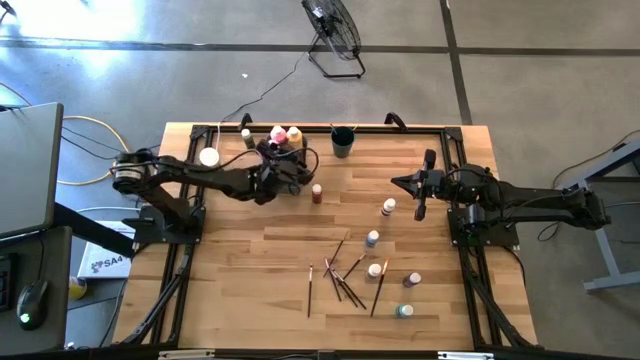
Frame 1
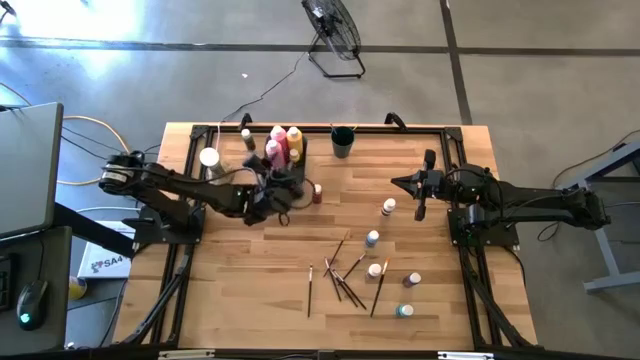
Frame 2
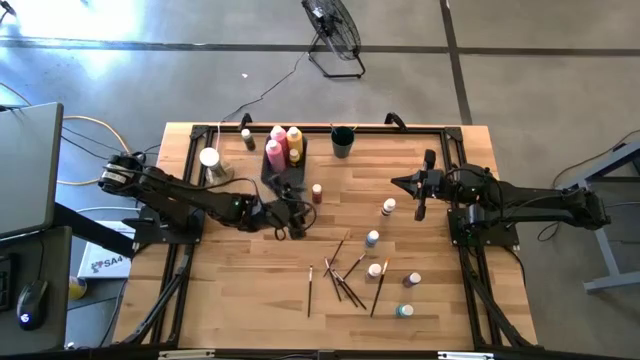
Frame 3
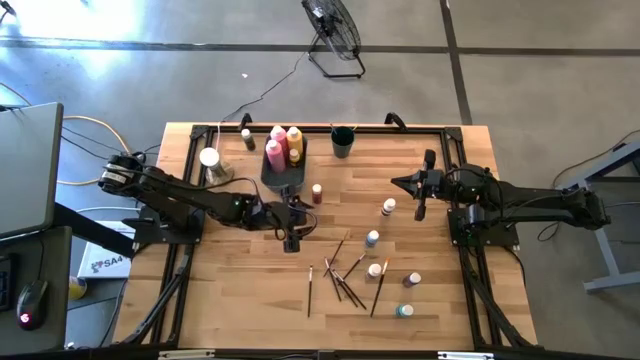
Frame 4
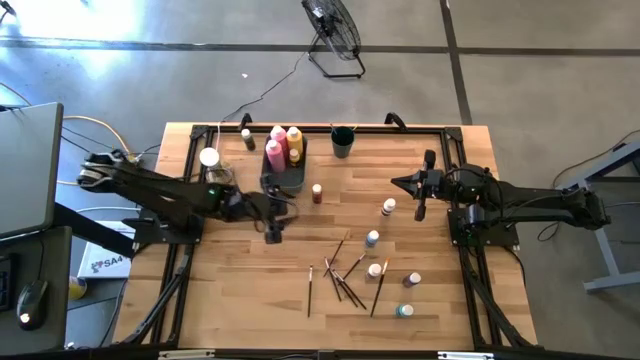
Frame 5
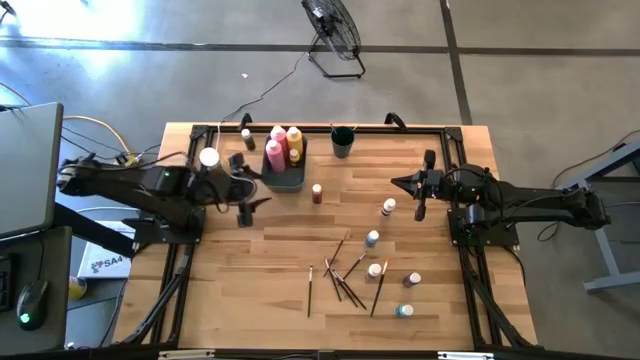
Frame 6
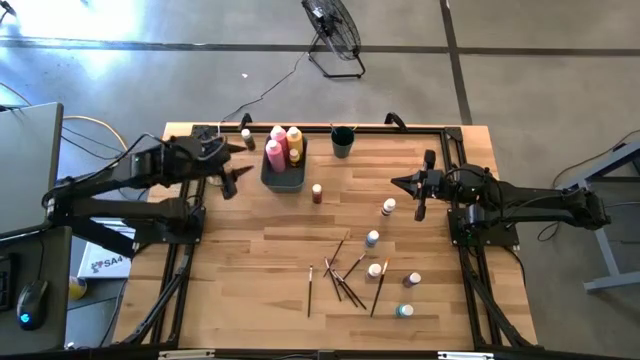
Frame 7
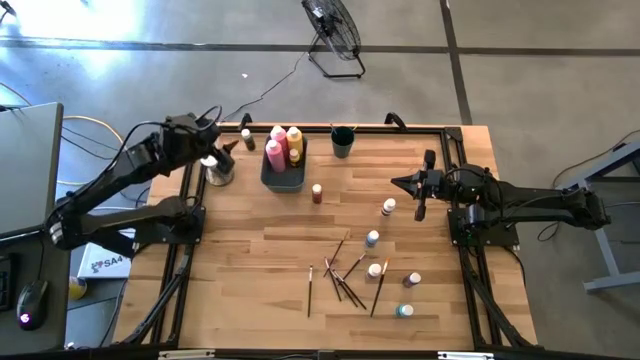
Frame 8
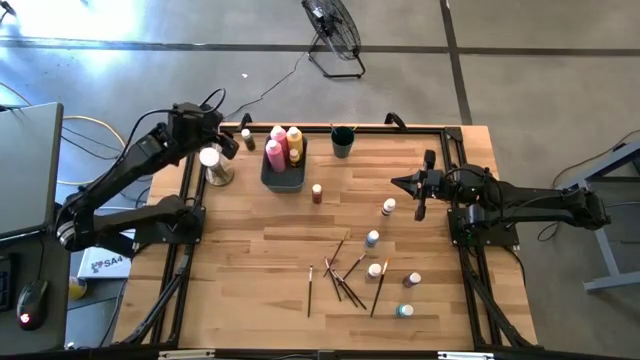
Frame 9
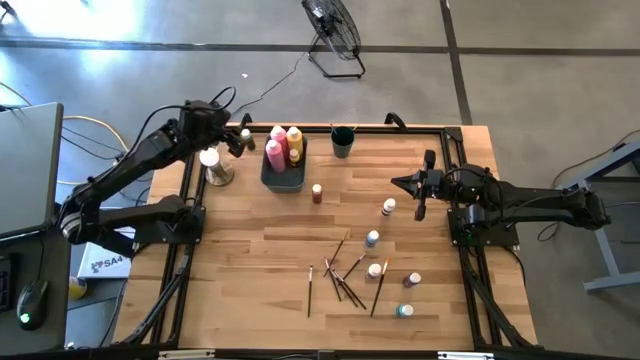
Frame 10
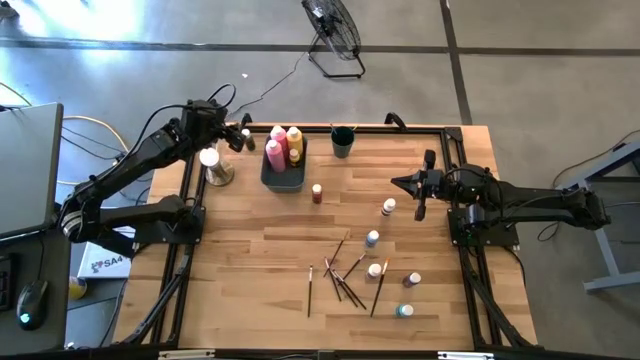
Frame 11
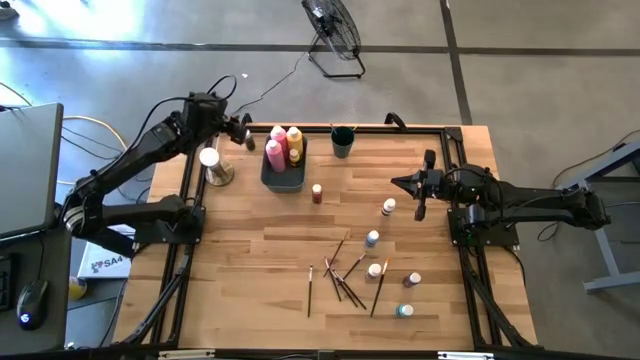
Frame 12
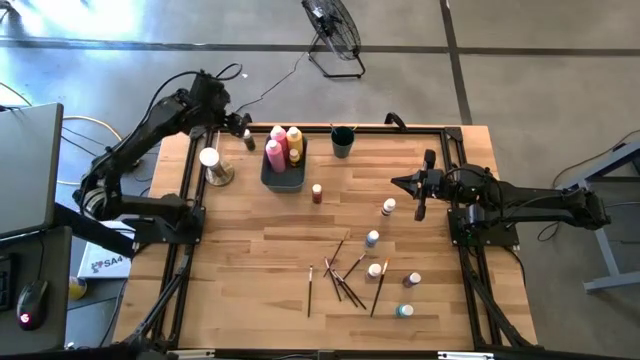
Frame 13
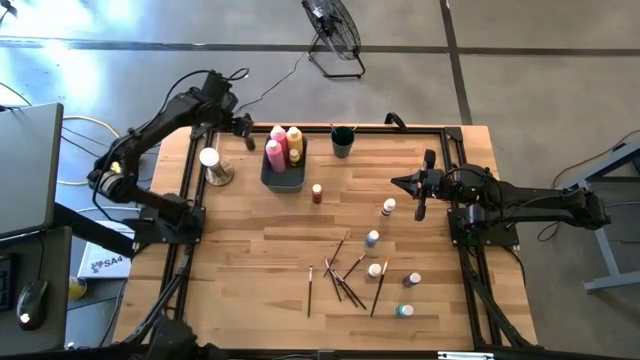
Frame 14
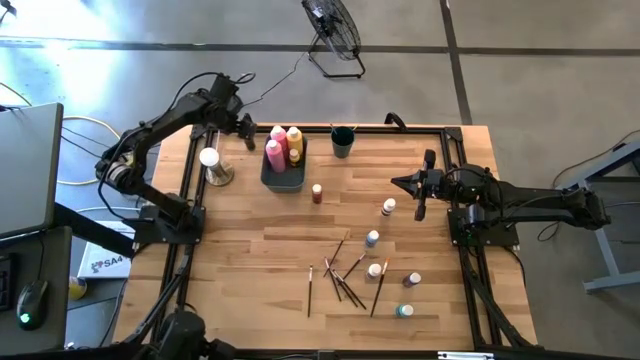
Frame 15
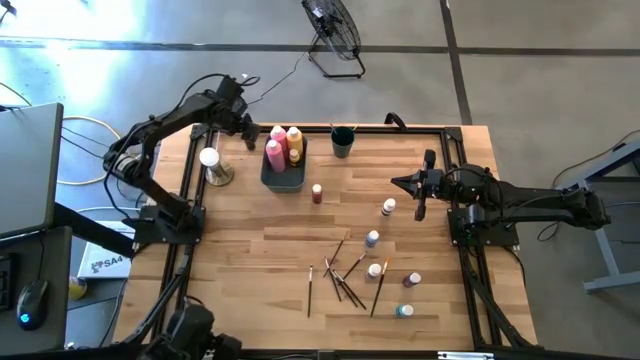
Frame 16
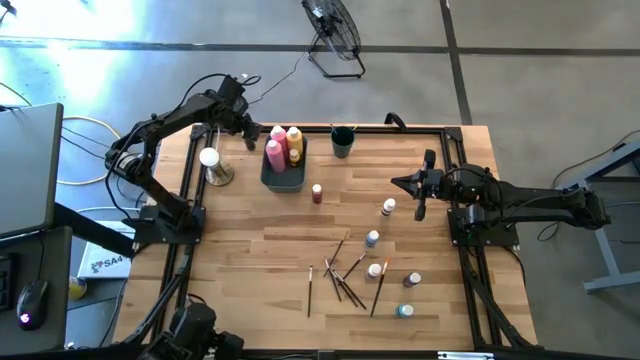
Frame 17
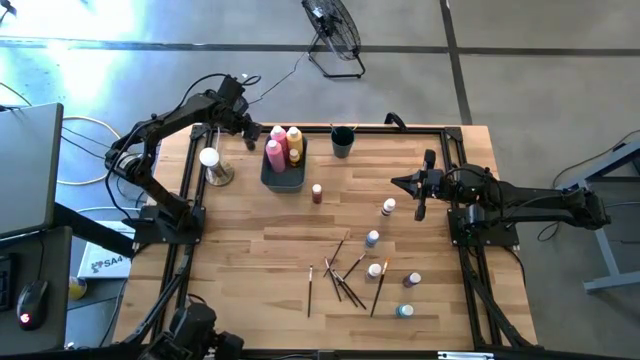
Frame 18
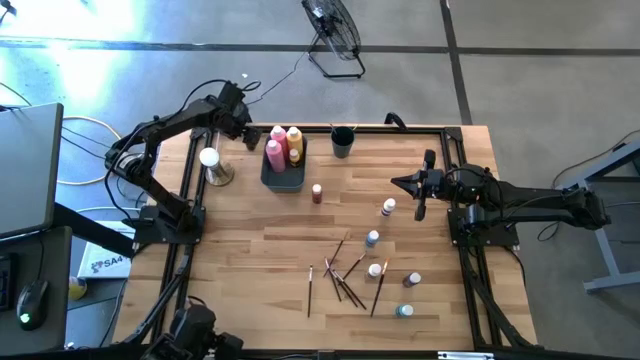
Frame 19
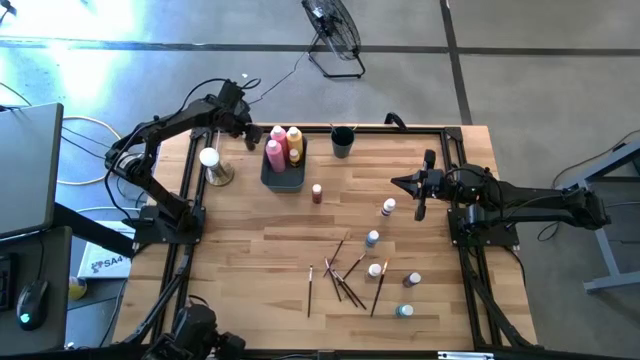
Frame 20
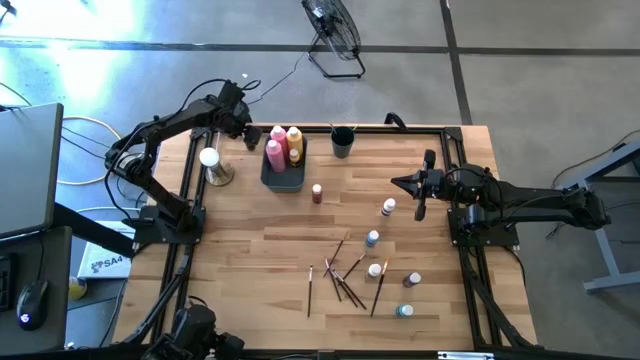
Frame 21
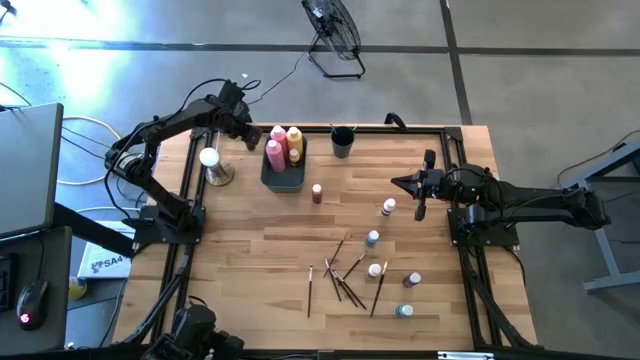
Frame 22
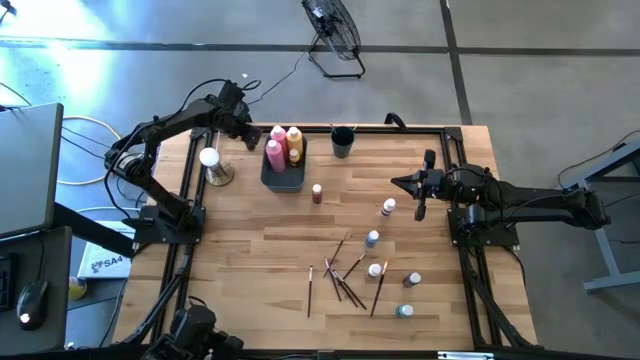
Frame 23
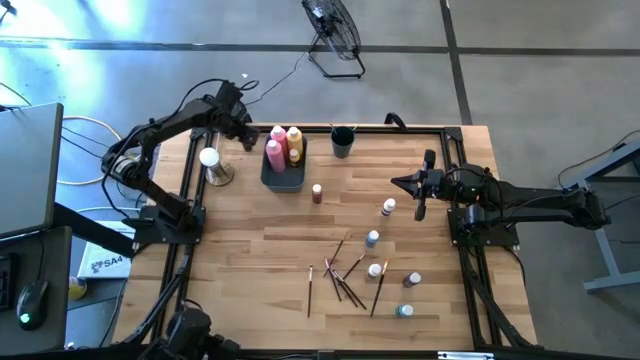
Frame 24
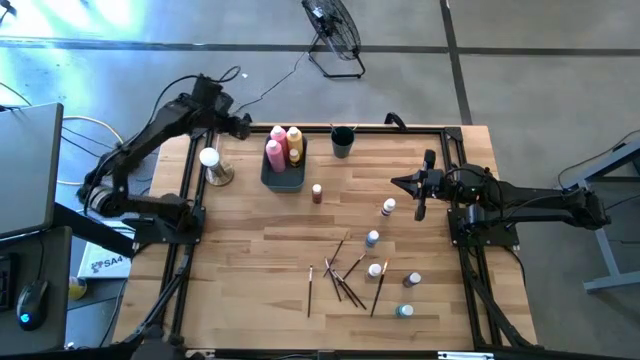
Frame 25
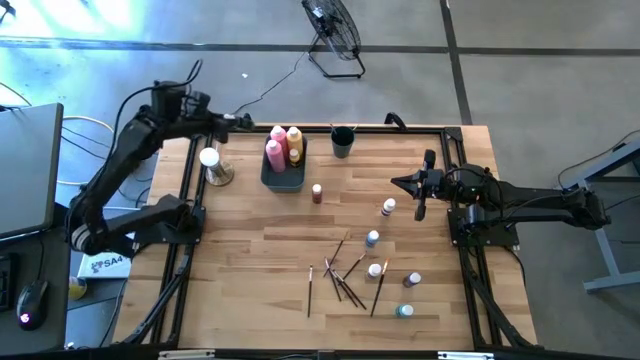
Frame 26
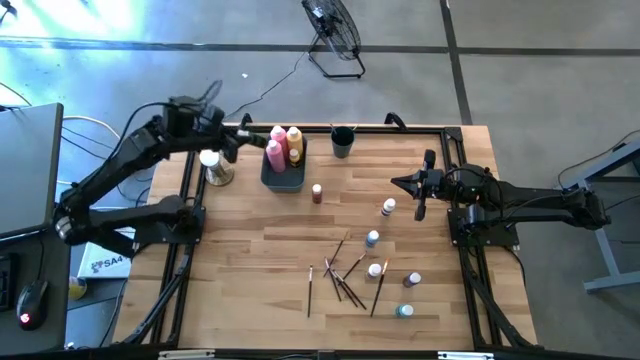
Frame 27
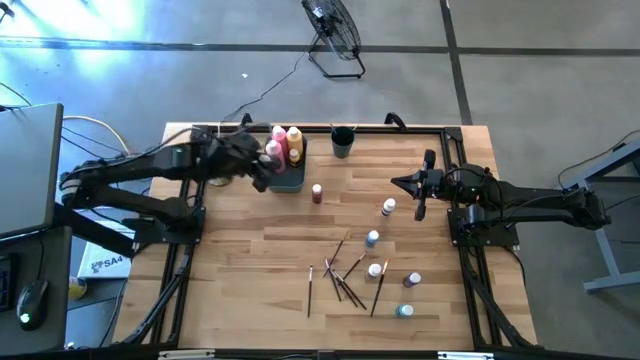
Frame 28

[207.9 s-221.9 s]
Task: Pick & Place Paint Supplies
Put the small green paint bottle into the green bin
